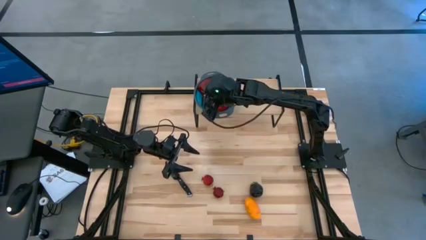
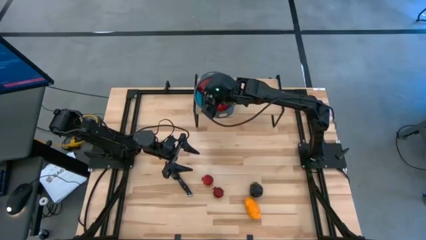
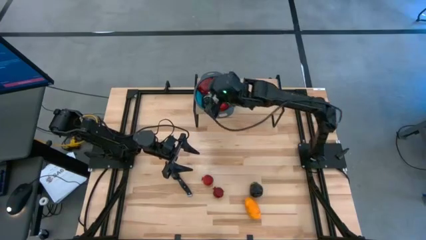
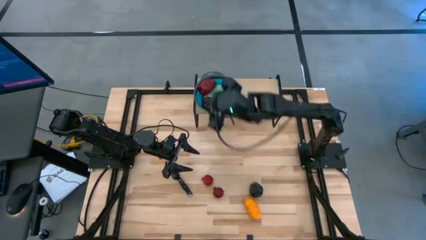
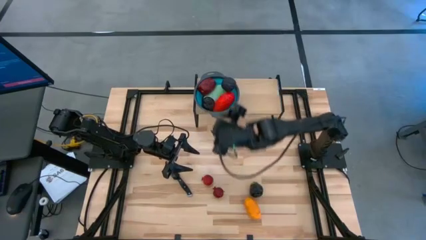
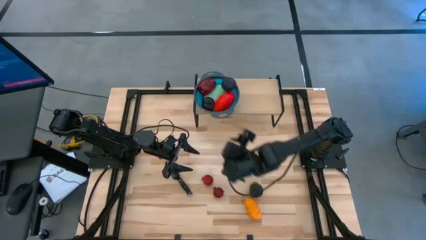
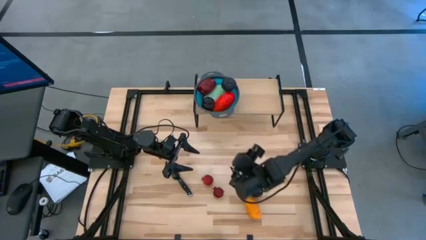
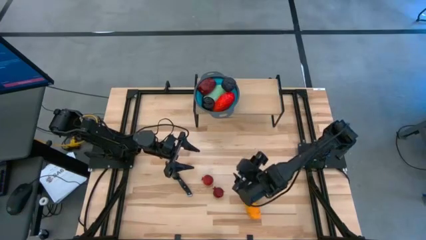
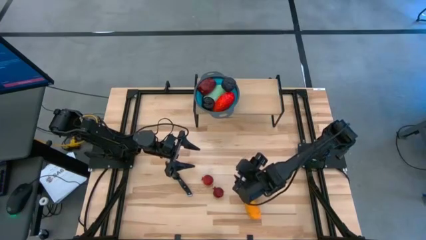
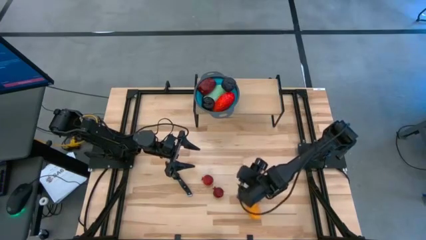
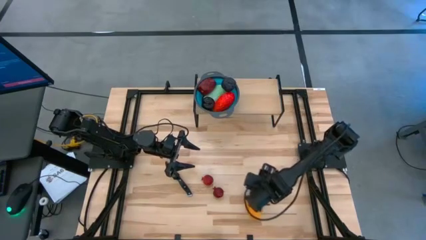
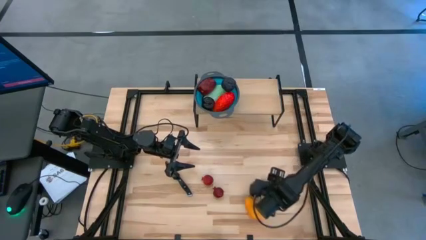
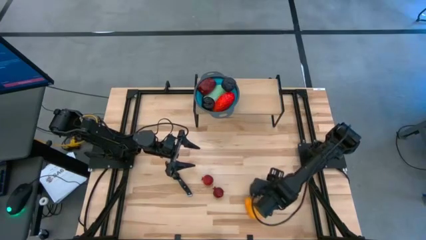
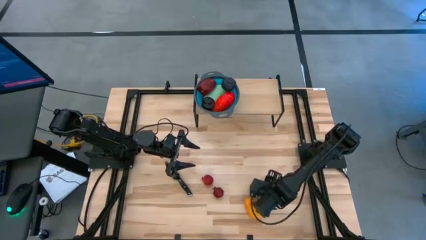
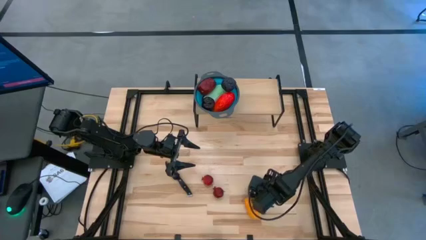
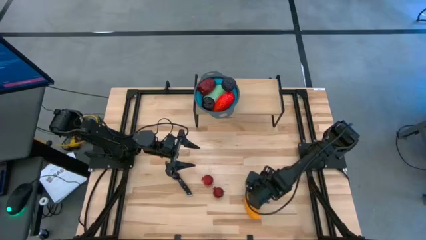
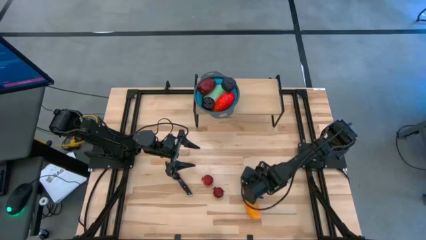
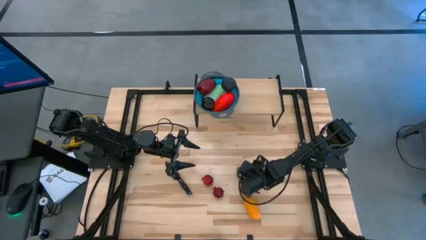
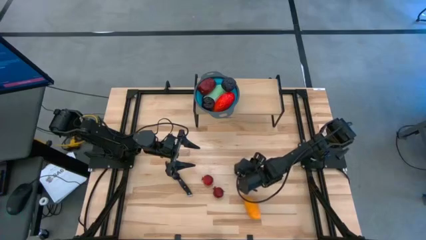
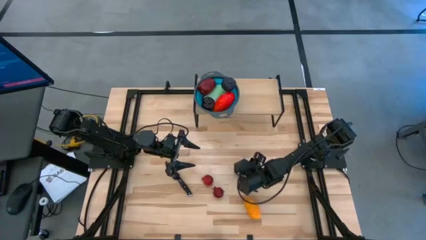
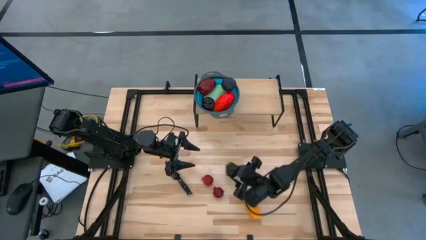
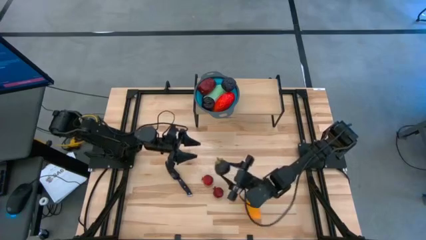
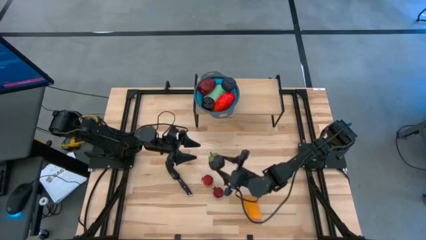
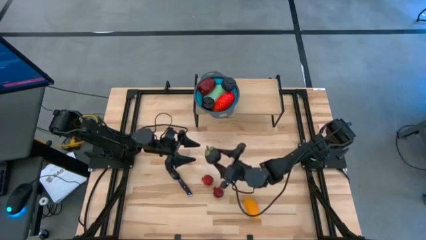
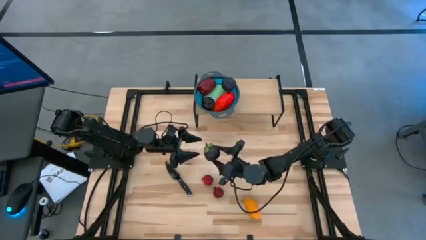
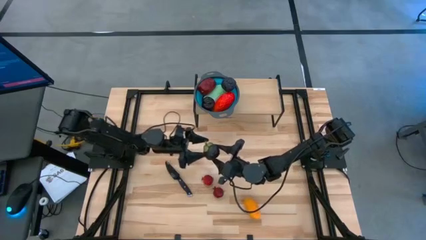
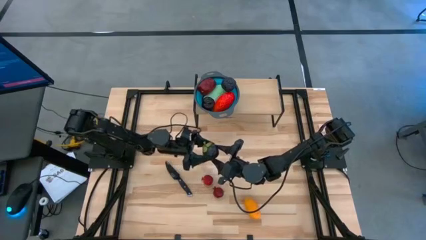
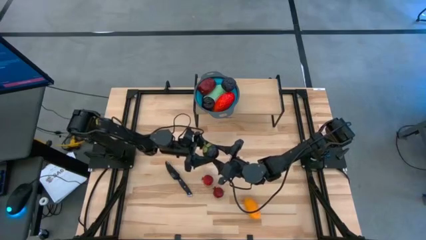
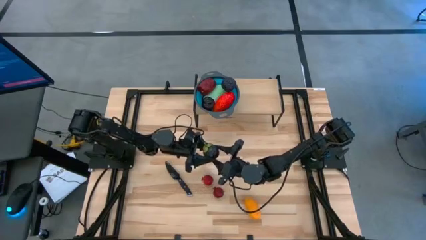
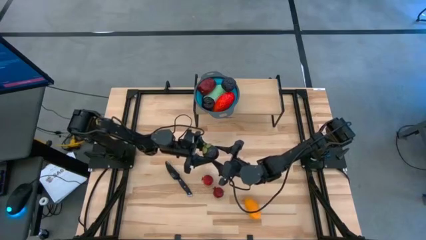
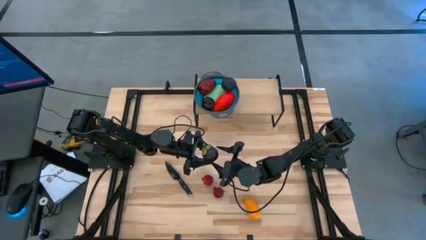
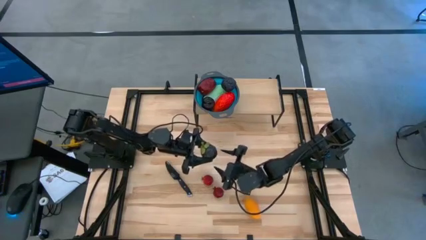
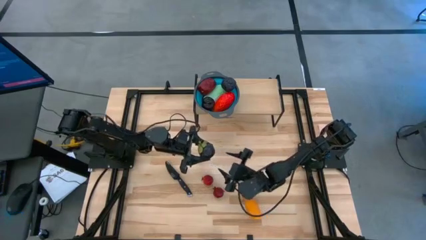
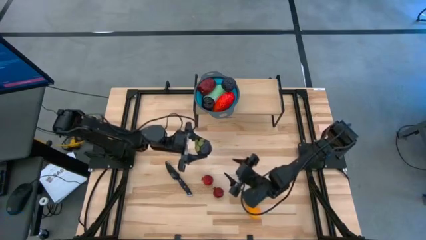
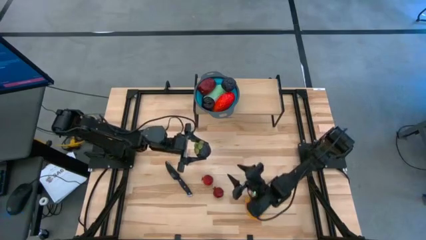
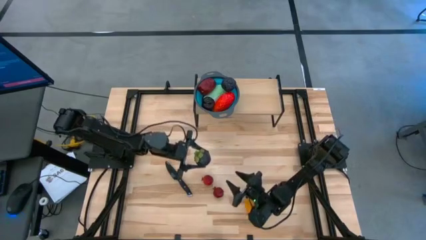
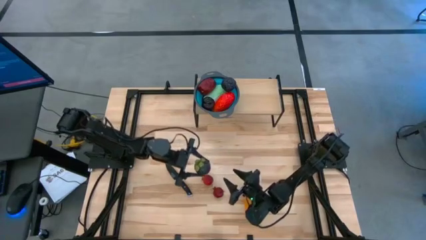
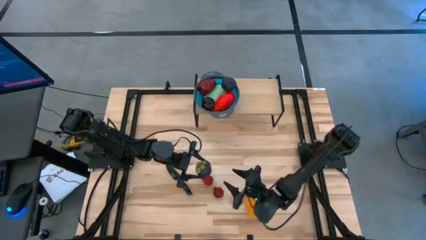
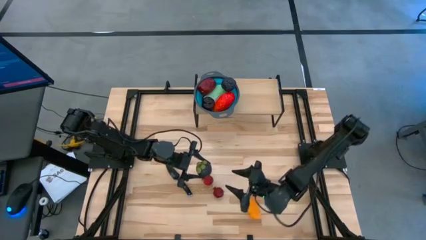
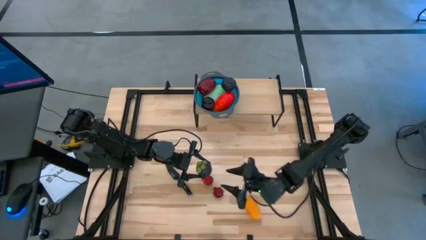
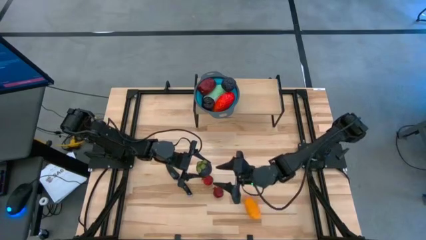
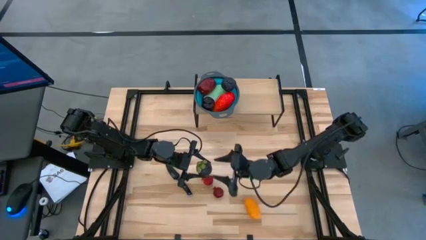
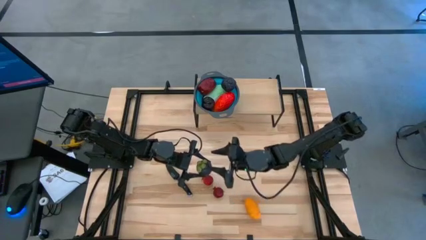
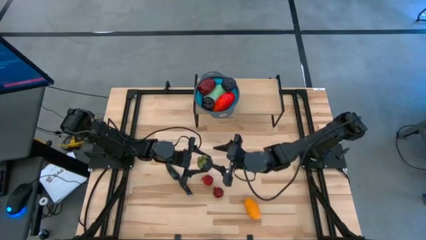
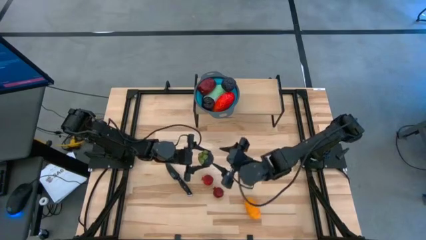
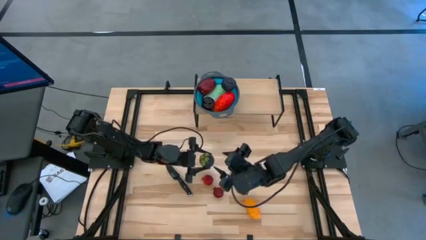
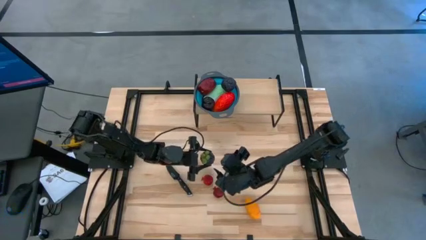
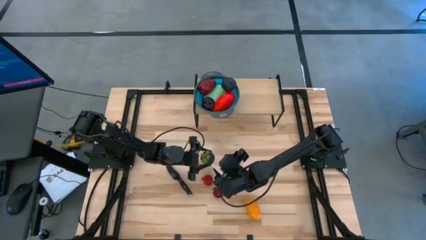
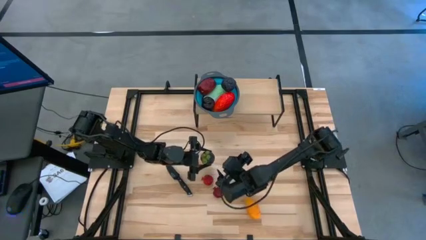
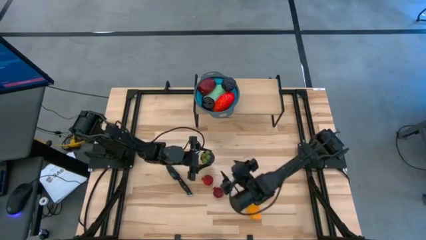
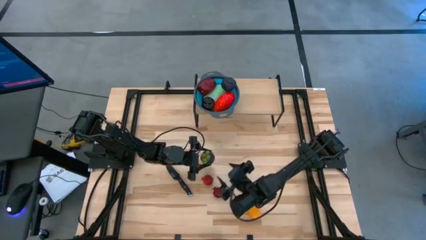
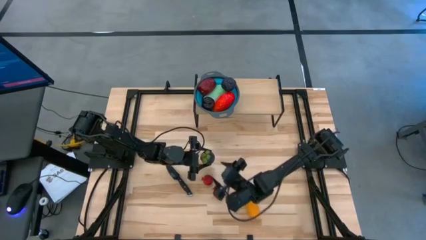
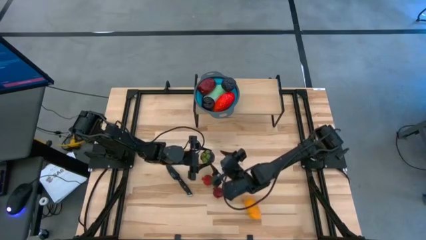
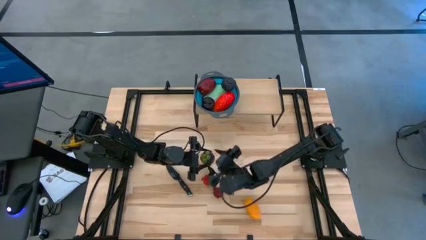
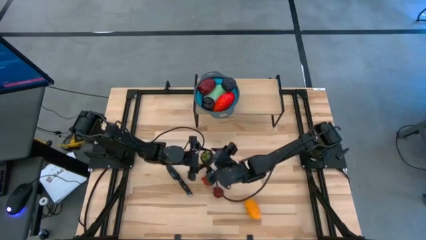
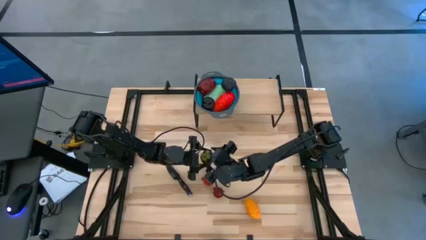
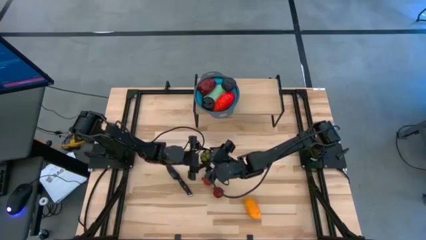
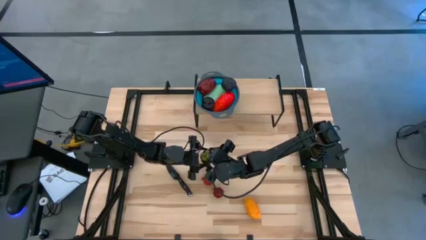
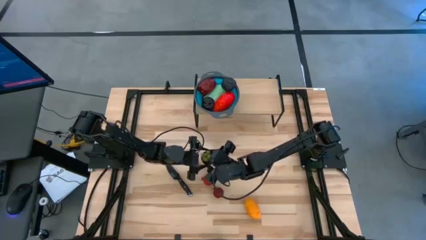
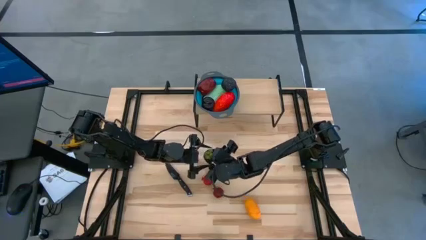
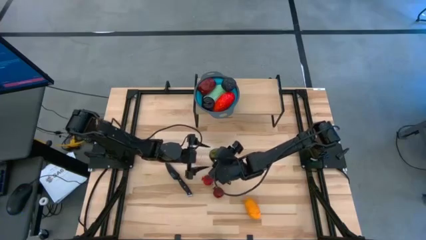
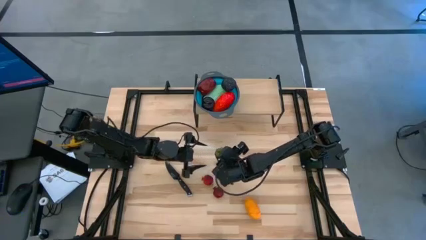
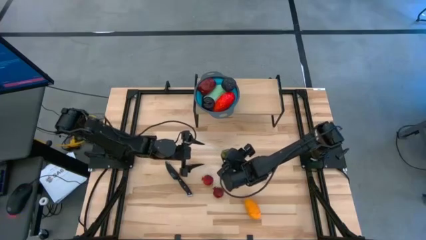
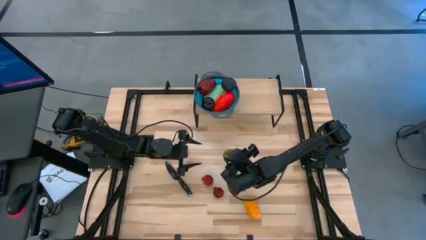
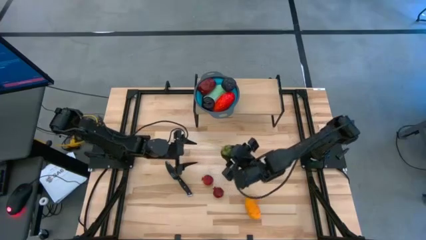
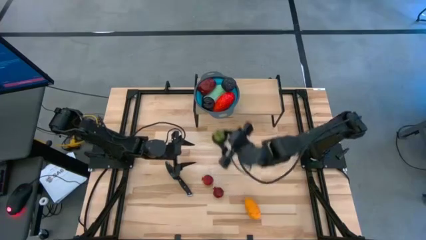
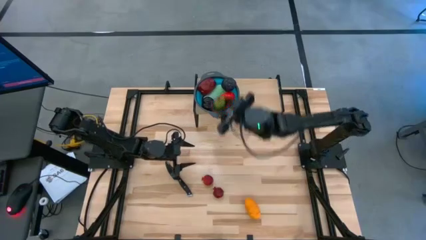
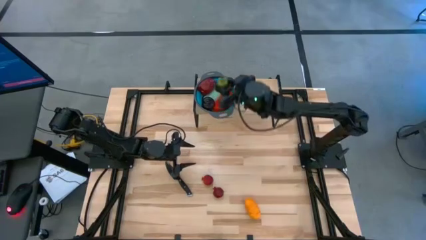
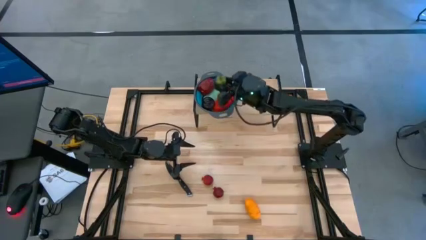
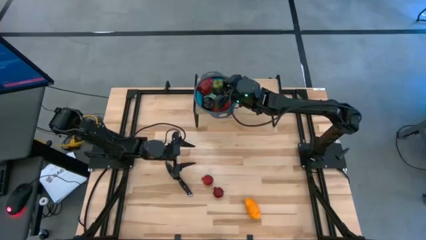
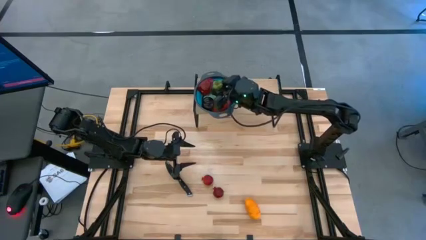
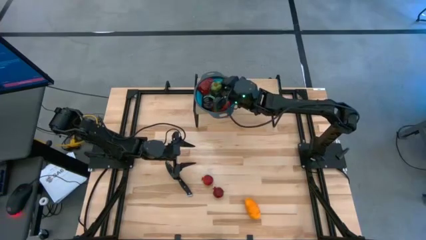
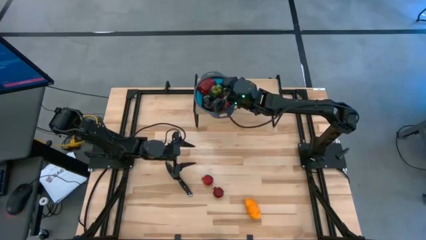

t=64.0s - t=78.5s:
Task: Pick & Place Fruit
Put the black mangosteen into the blue strainer bowl on the shelf

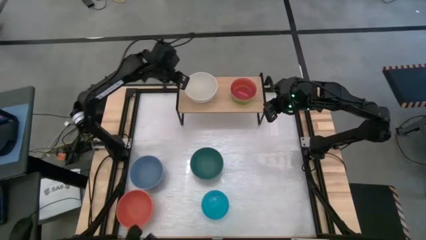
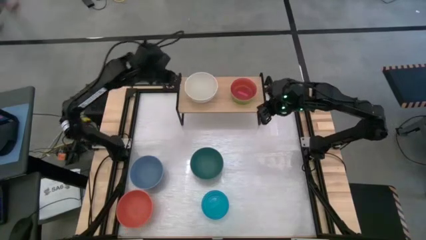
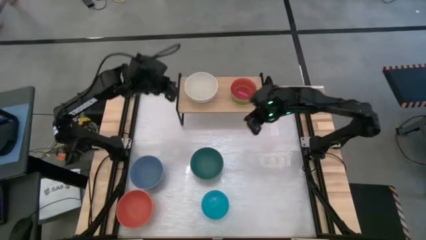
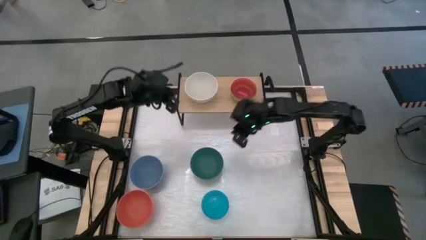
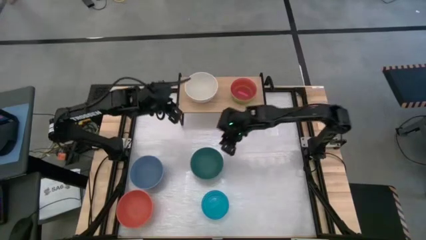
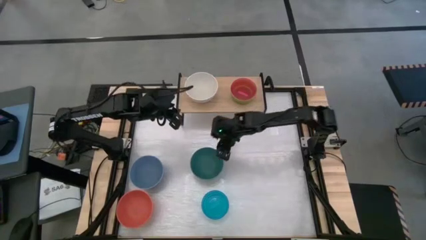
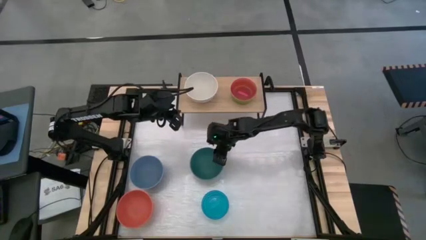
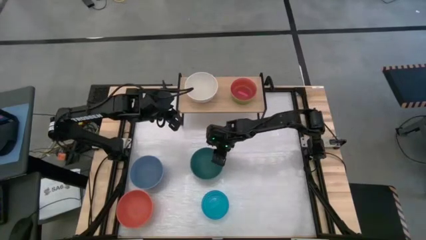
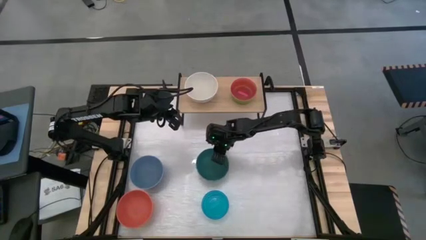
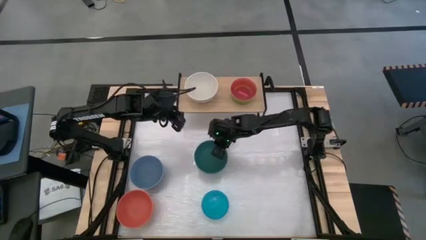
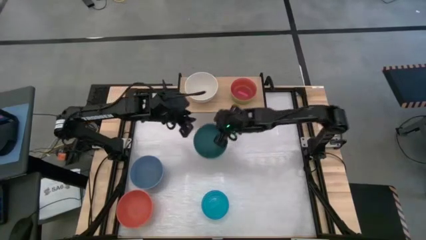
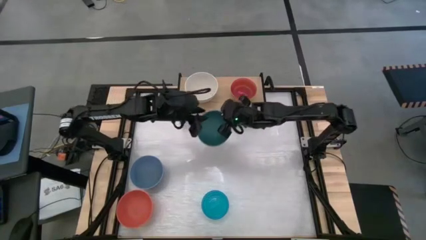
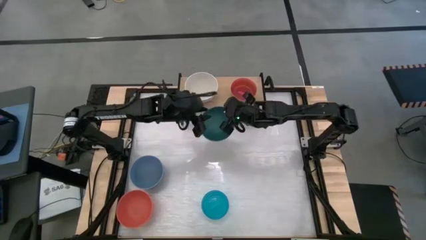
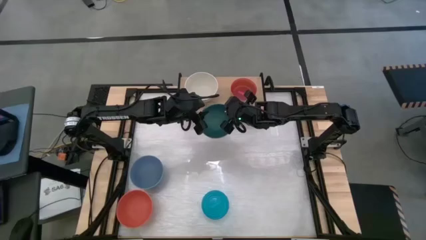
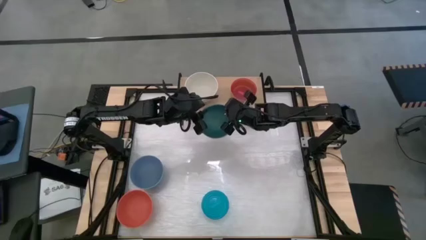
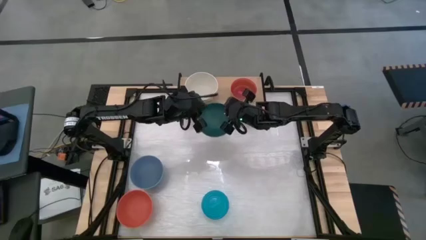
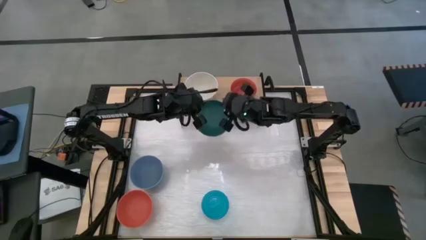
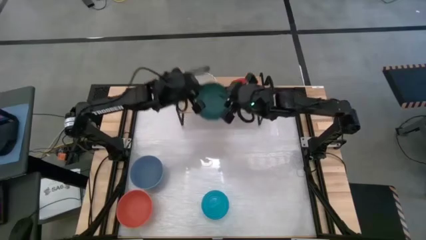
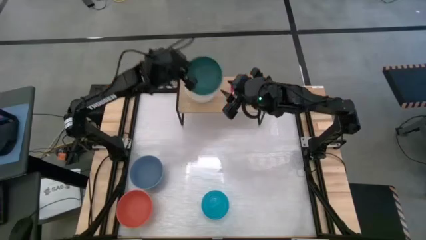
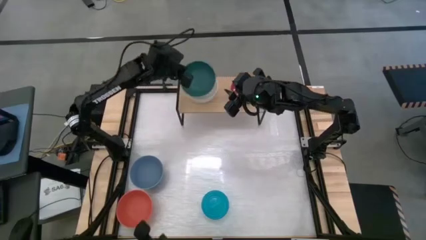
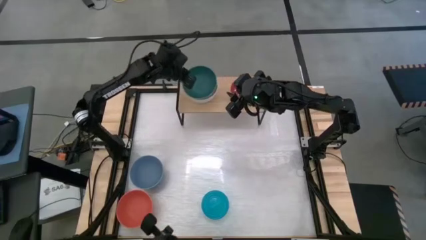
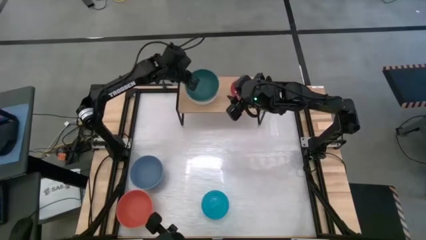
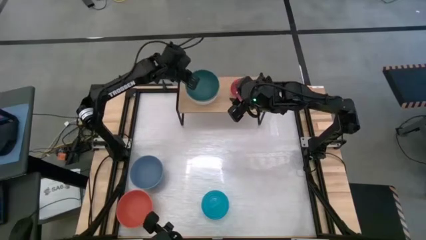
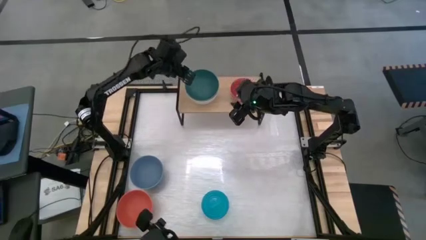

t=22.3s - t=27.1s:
Task: Place and stack bowls onto a shelf
Stack the large dark green bowl on top of the large white bowl on the shelf
